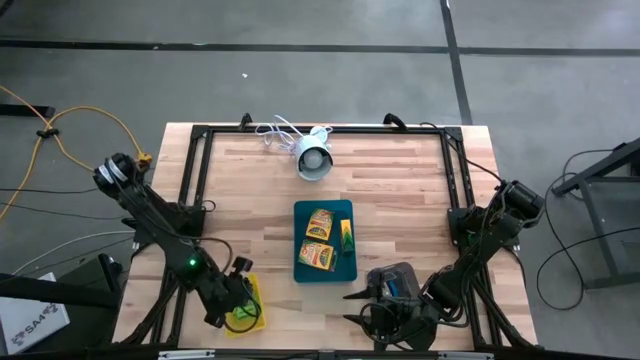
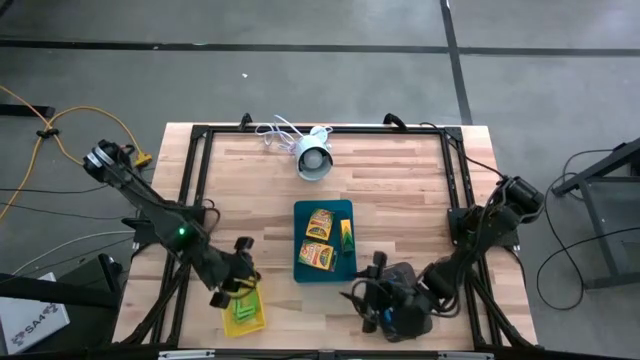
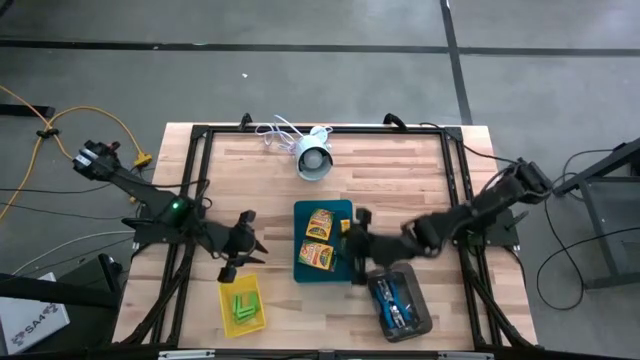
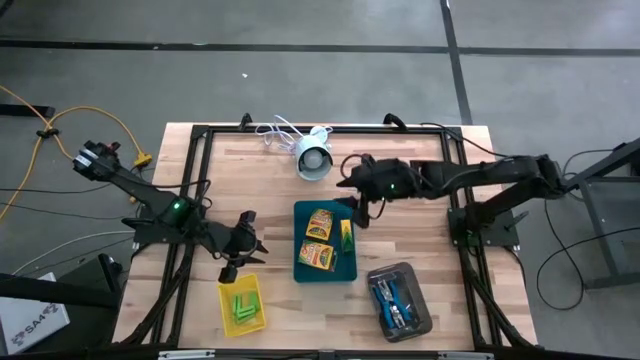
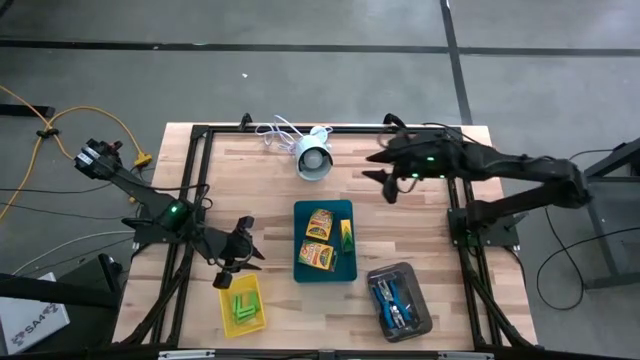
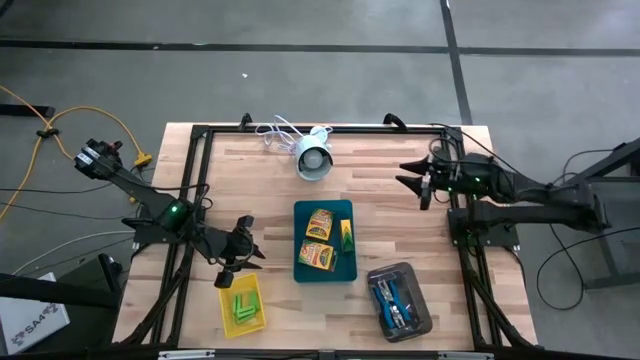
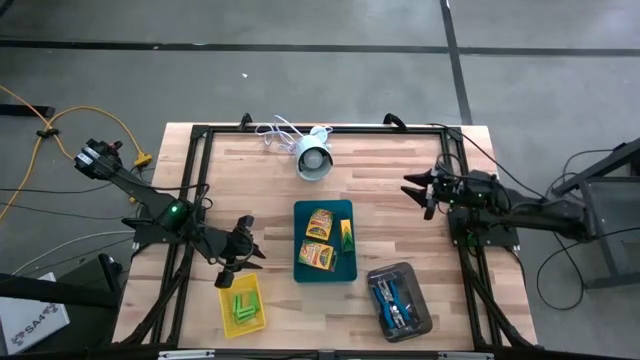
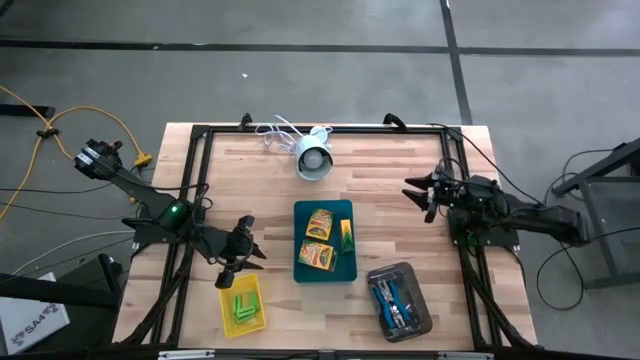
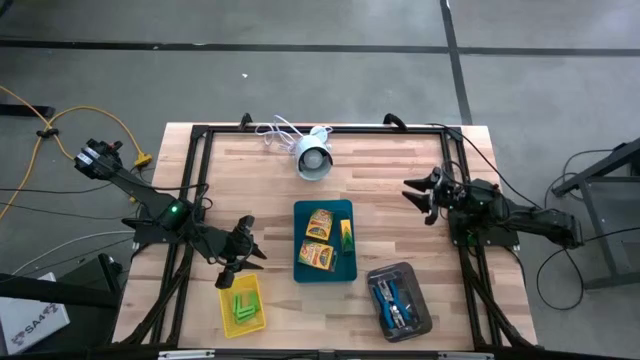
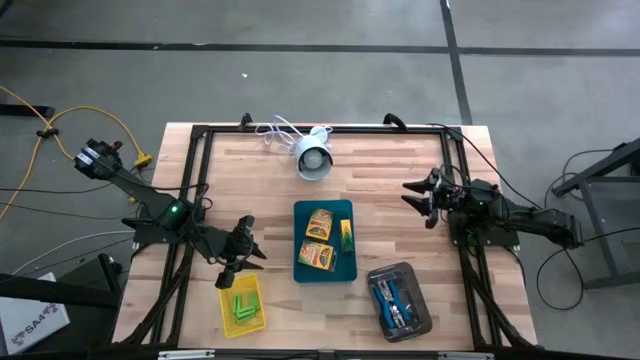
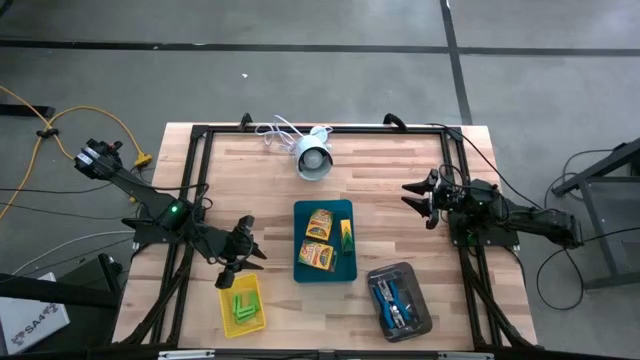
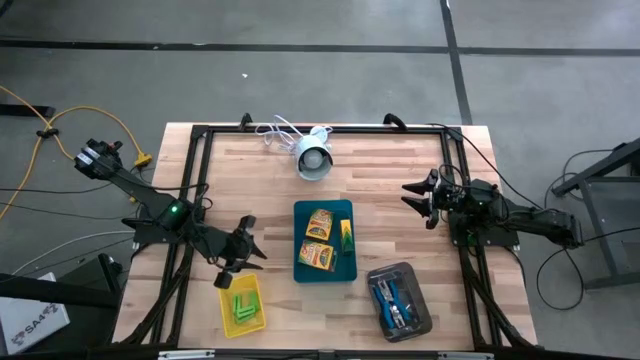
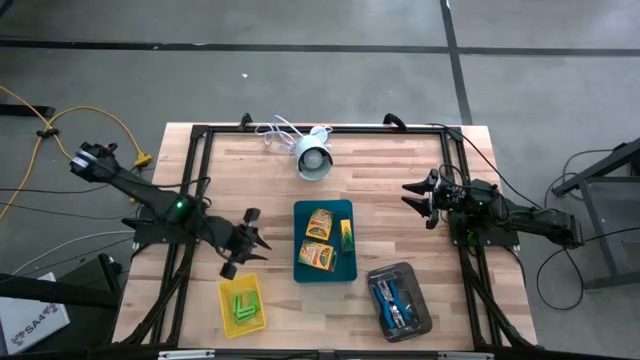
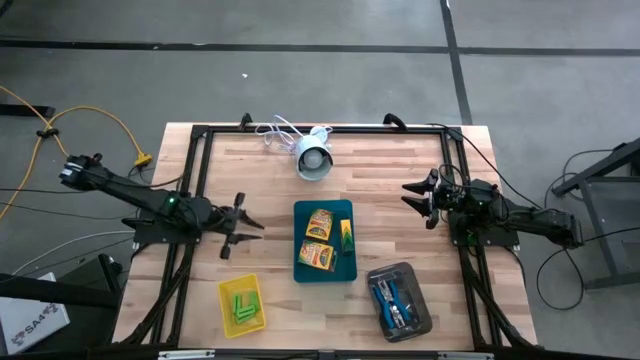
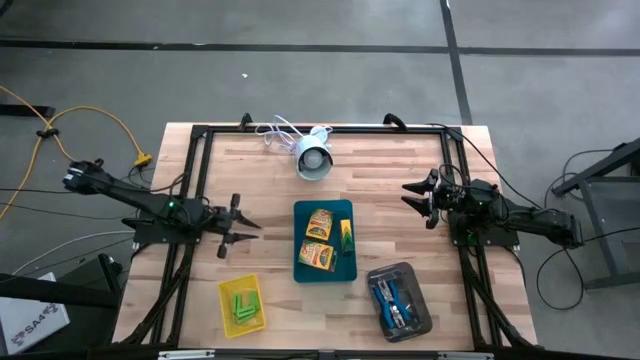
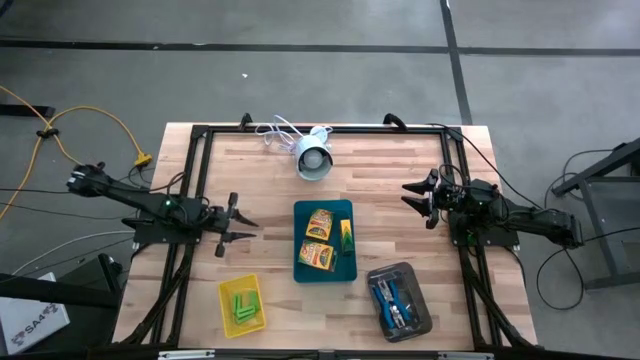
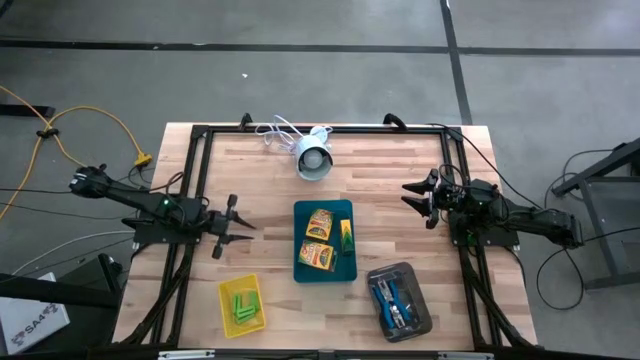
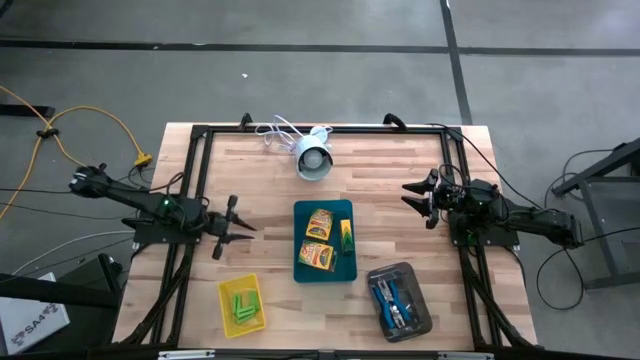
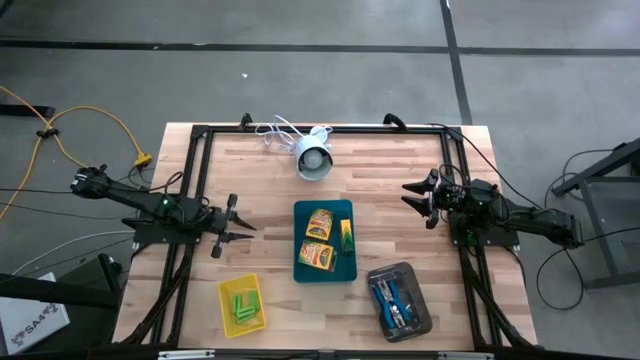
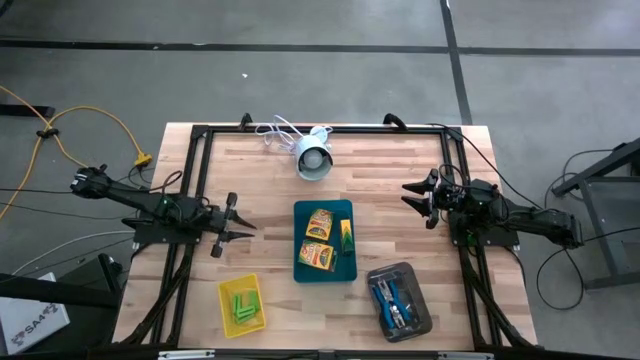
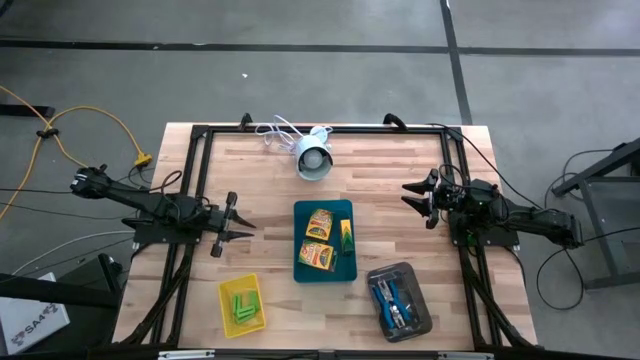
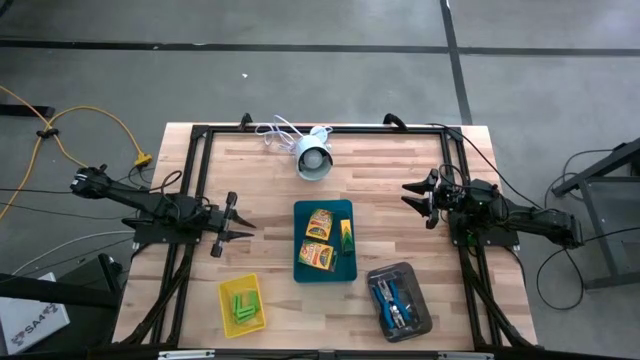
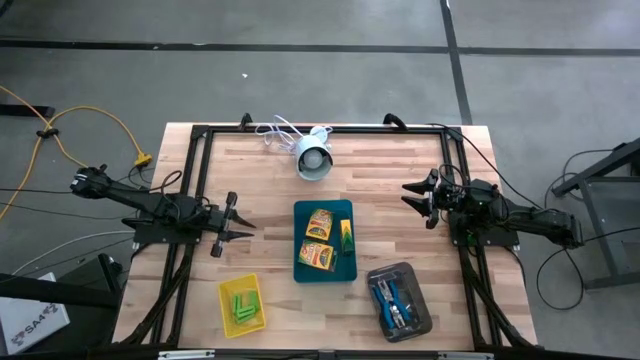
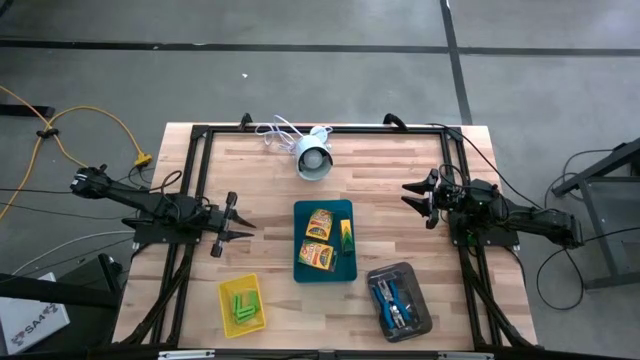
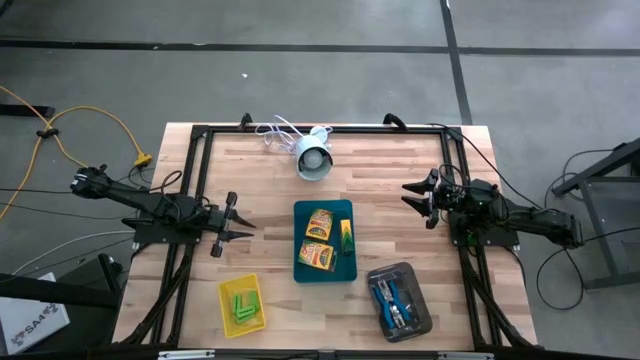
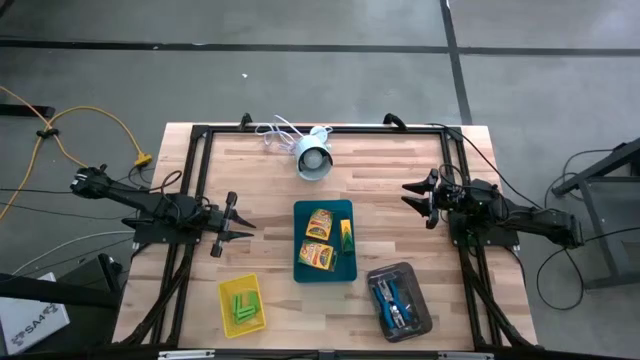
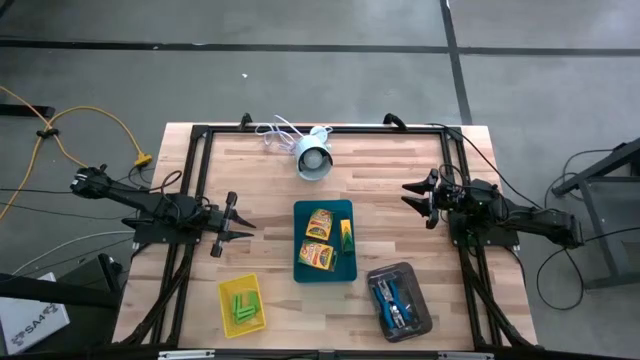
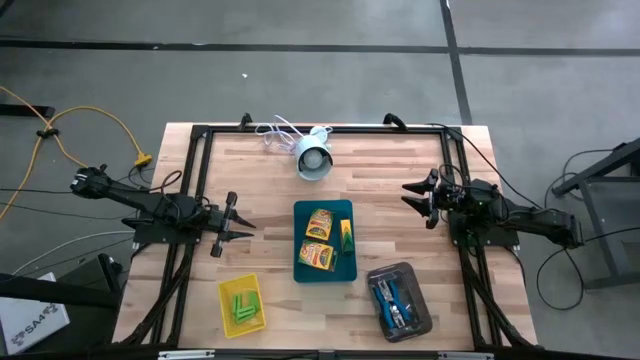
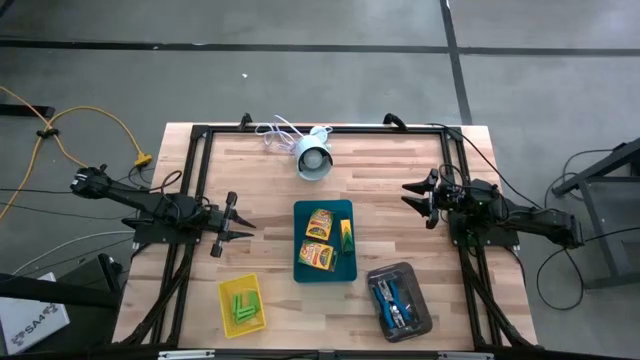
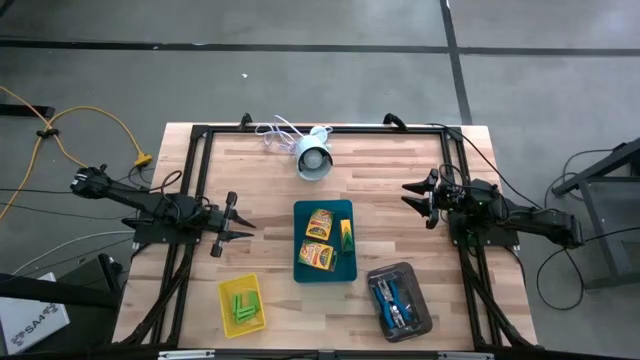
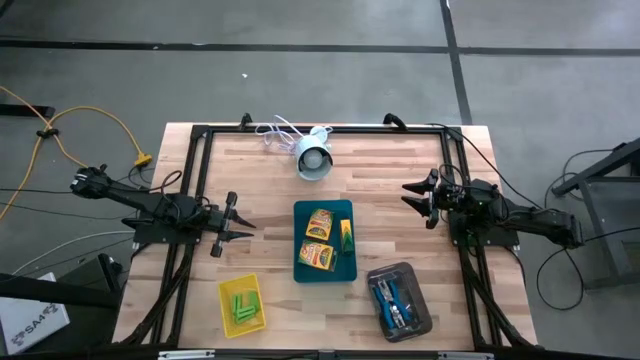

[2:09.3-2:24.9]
Task: Pick & Place School Supplies
Return to Home Position

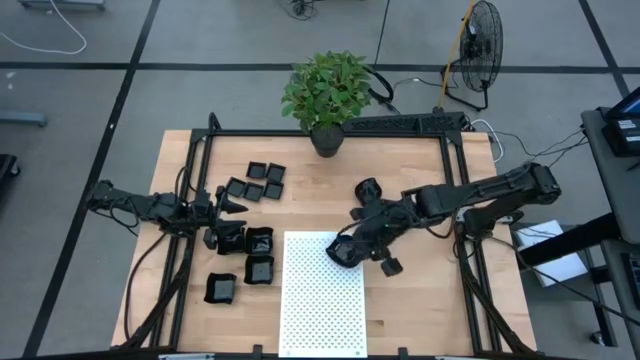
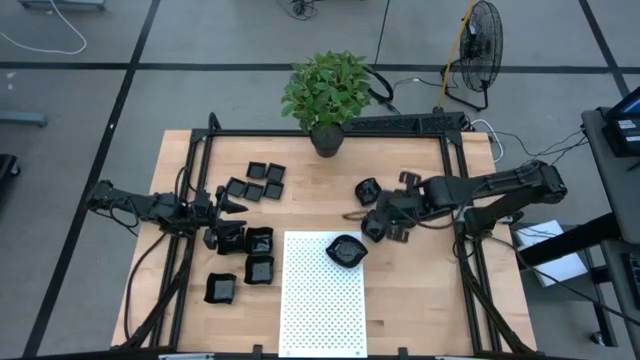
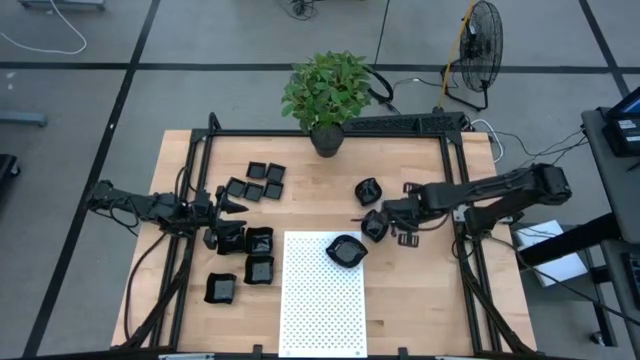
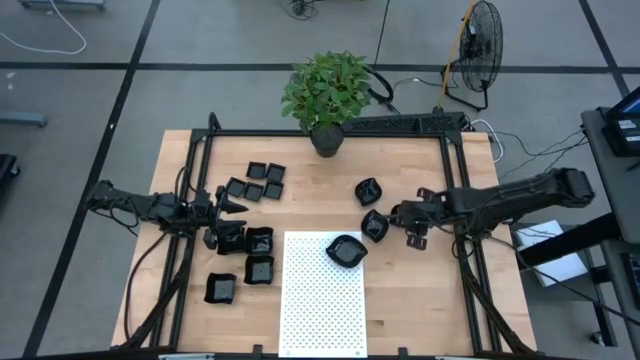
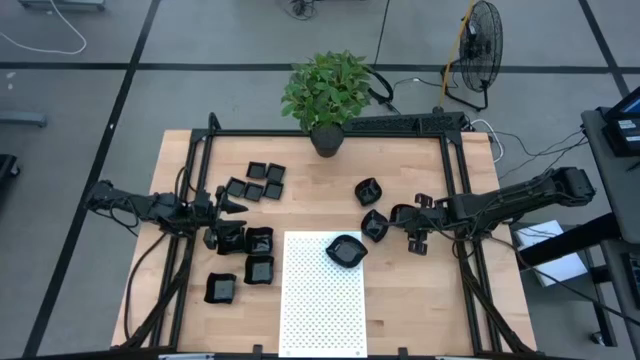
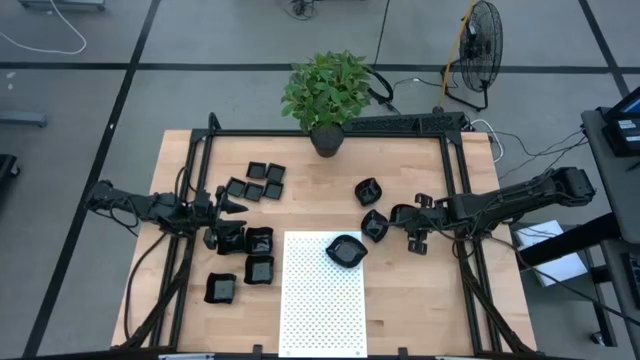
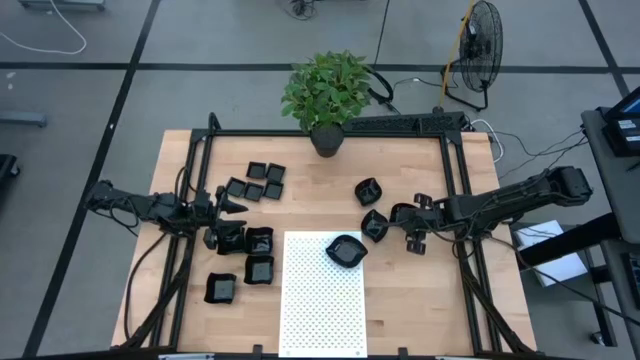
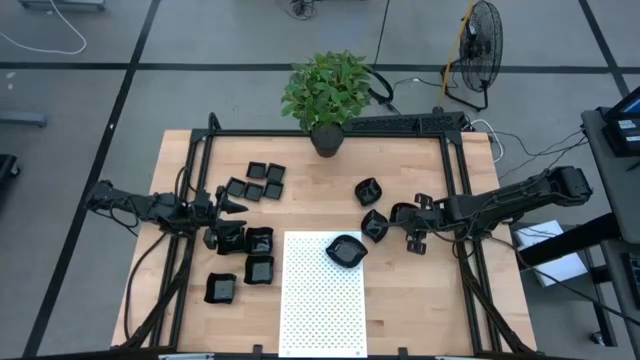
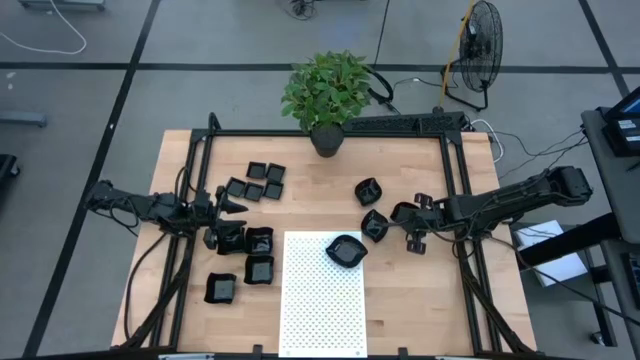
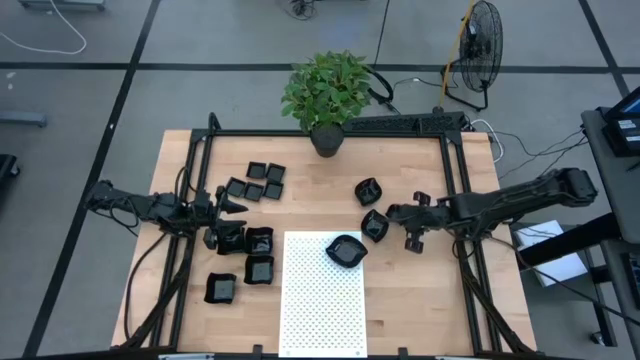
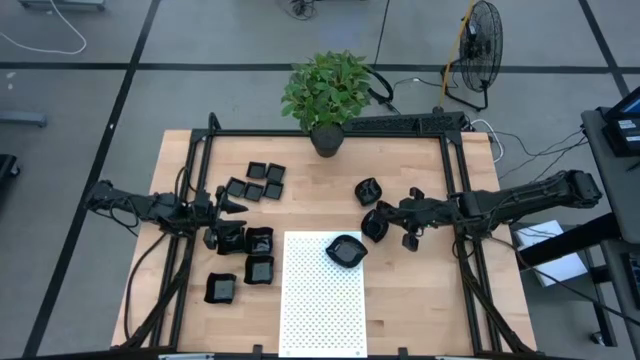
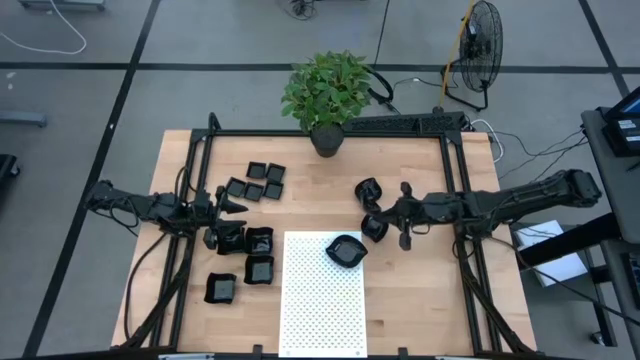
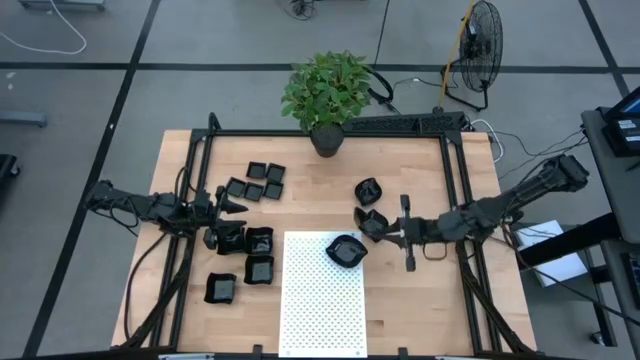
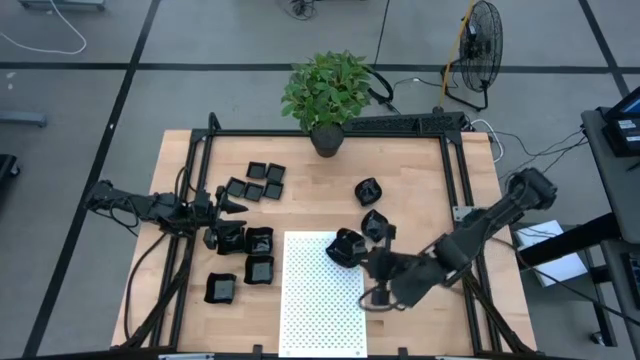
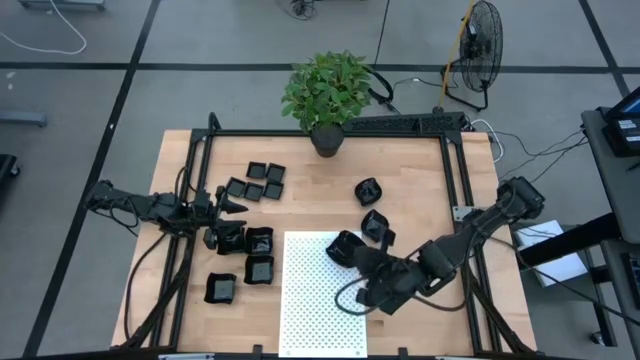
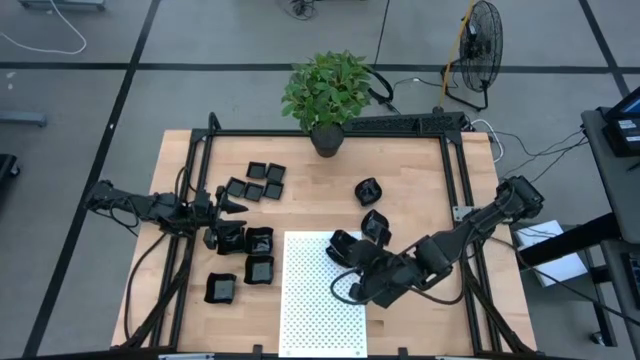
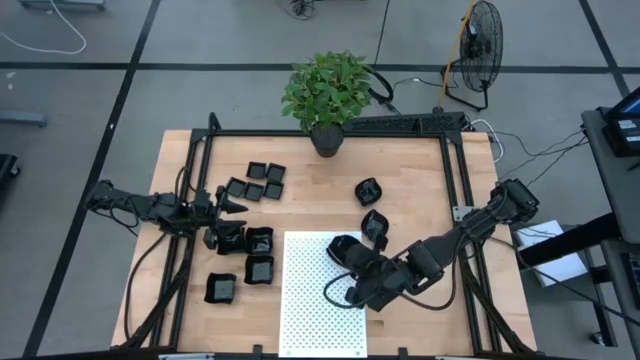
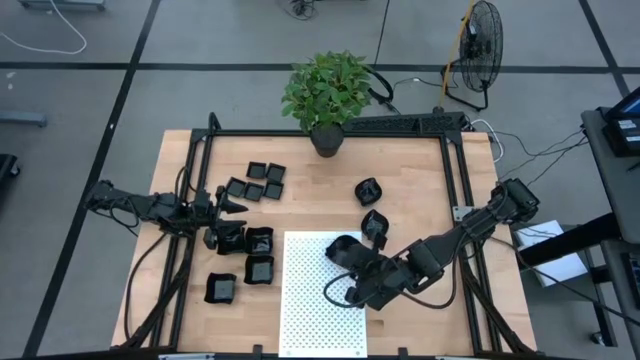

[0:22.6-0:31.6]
Task: Pick & Place Mini shaped plates
Stack the left leaf shaped plate on top of the leaf shaped plate on the shelf
